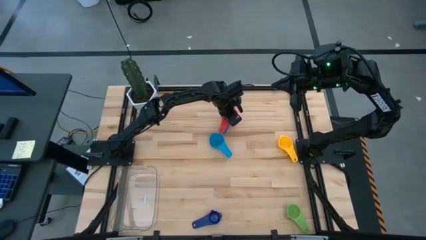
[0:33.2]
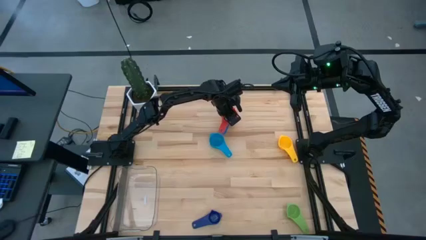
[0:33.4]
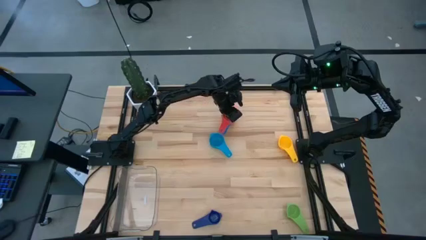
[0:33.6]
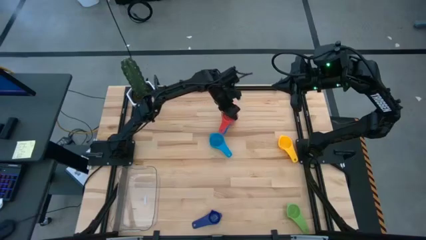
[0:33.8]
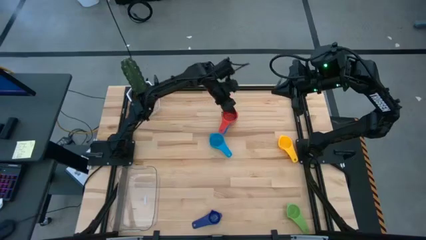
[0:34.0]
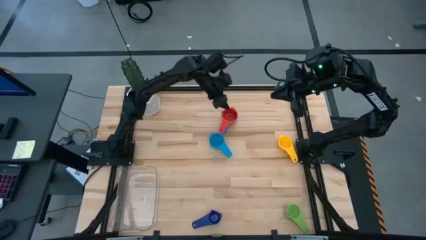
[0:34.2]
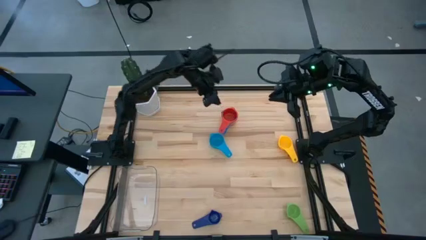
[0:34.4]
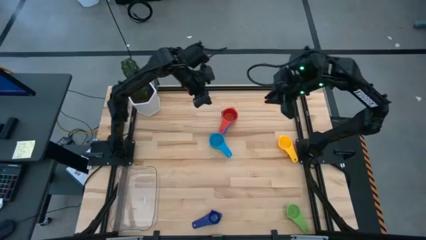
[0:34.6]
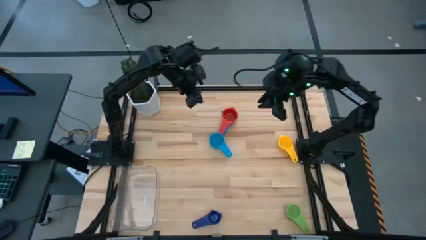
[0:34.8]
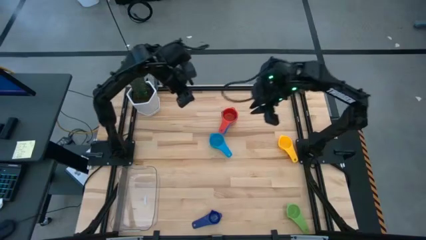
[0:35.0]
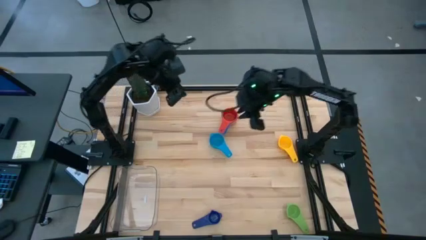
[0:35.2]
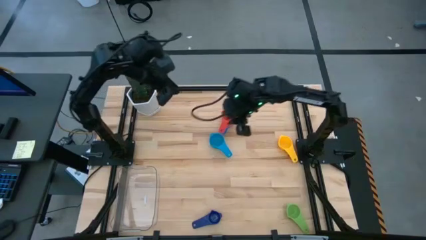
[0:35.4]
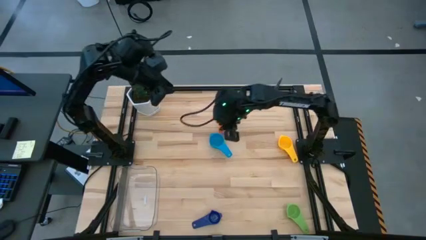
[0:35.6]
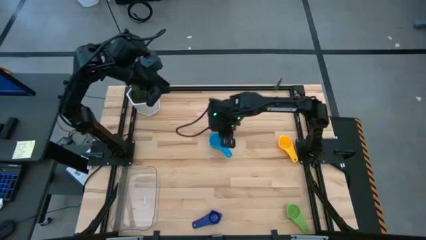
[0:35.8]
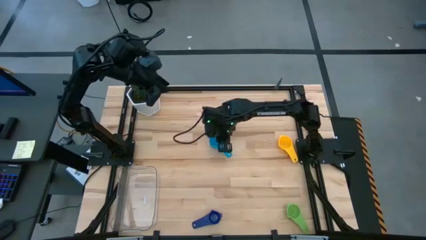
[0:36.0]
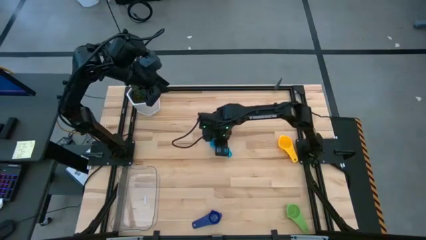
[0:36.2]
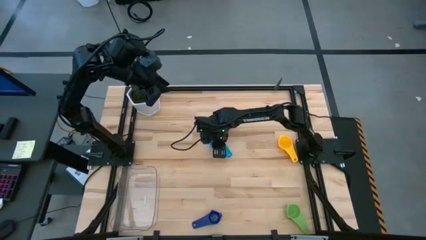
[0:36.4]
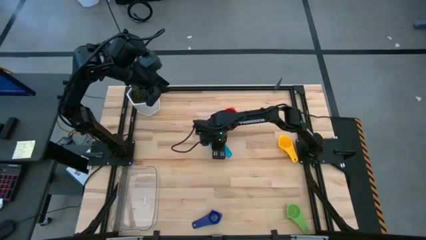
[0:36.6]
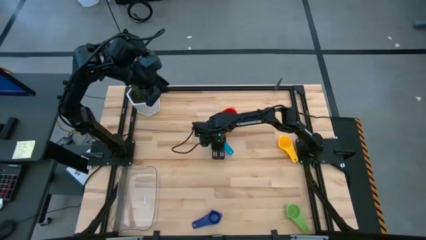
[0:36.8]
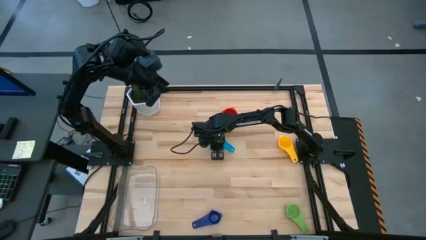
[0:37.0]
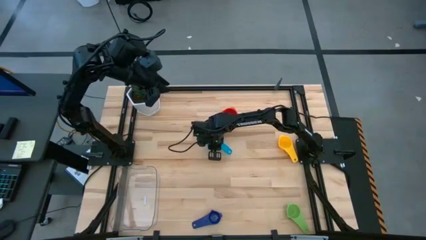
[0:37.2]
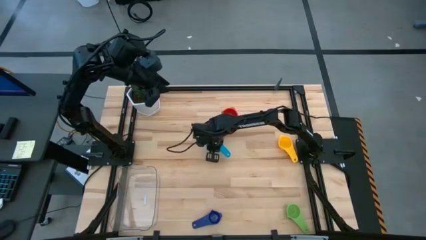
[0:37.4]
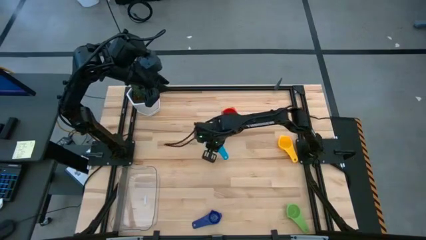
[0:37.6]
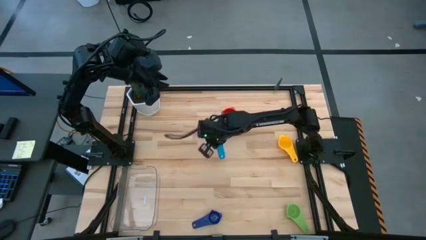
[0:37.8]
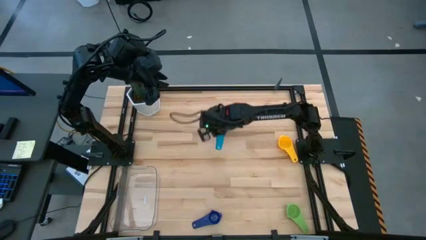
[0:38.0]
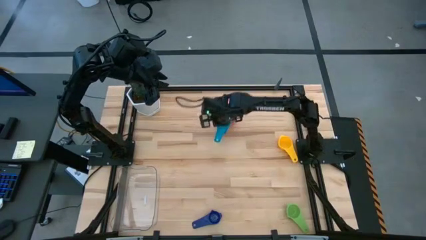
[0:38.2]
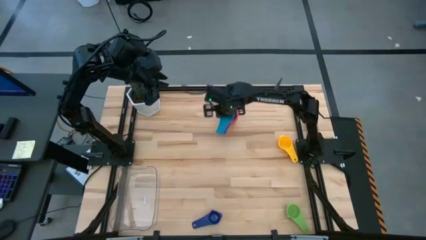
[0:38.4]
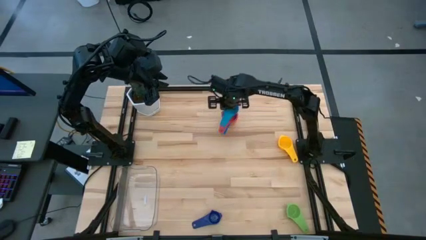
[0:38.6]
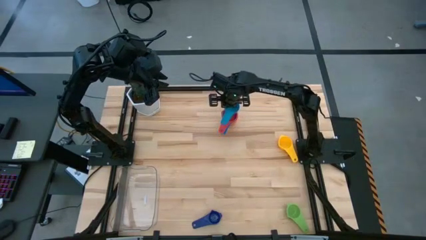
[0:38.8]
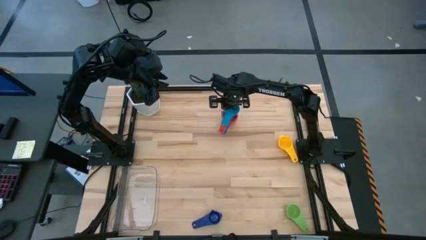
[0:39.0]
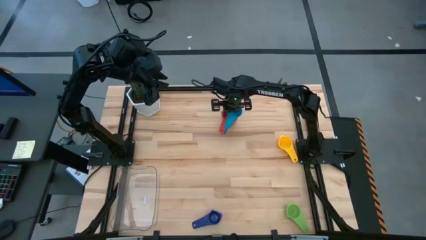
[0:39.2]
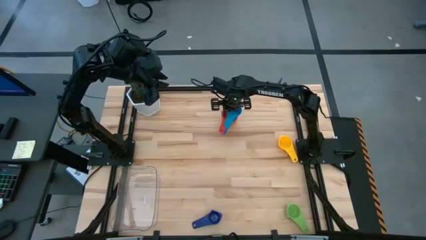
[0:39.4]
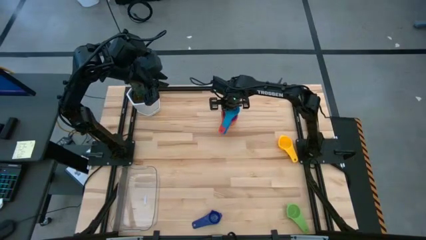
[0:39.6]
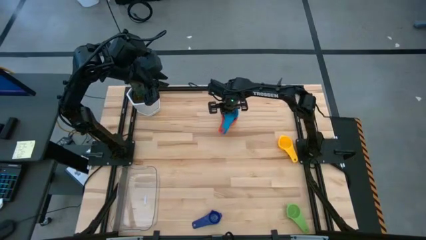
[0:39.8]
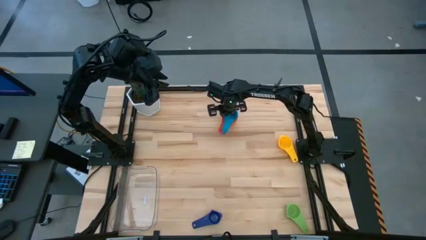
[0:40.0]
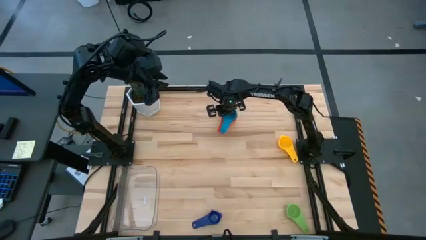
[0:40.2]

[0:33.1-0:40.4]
Task: Nest measuring cups in basket
Stack the light blue measuring cup on top of the red measuring cup

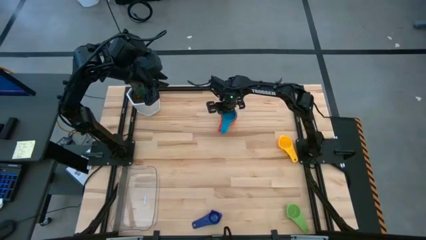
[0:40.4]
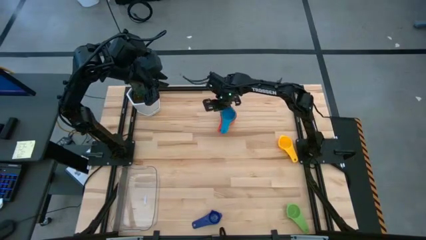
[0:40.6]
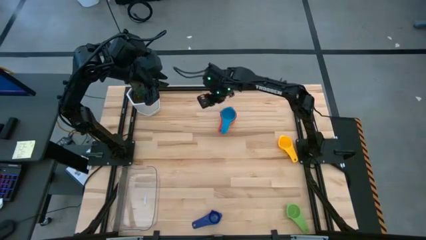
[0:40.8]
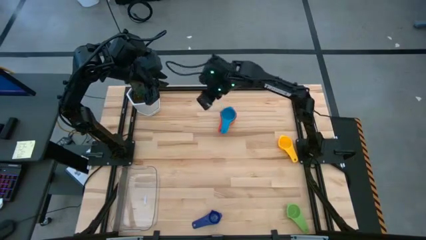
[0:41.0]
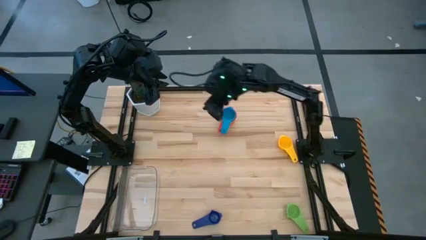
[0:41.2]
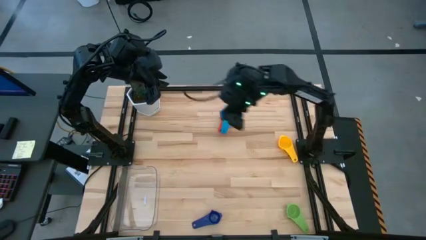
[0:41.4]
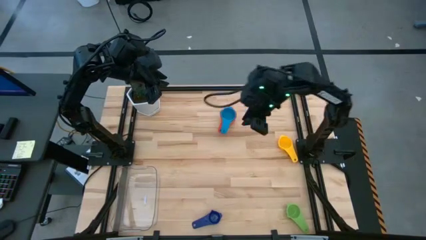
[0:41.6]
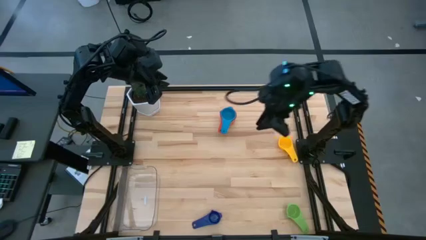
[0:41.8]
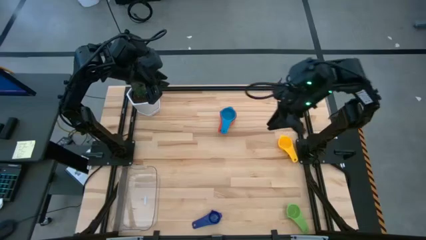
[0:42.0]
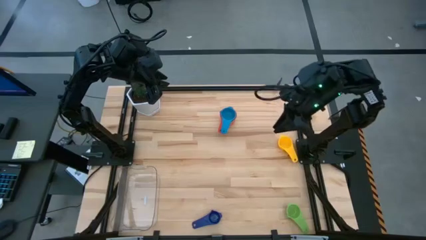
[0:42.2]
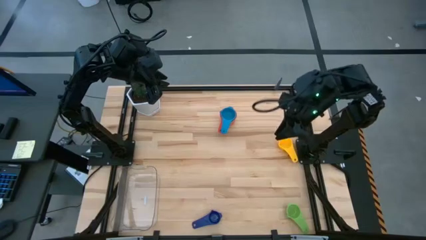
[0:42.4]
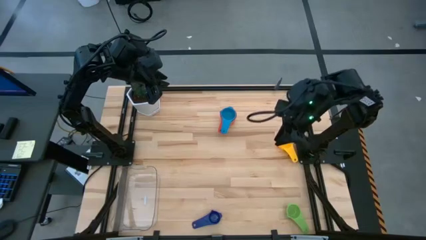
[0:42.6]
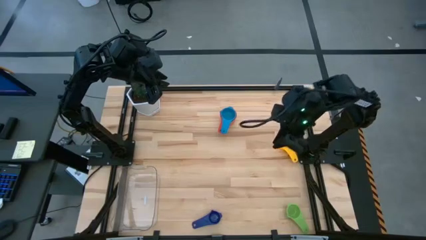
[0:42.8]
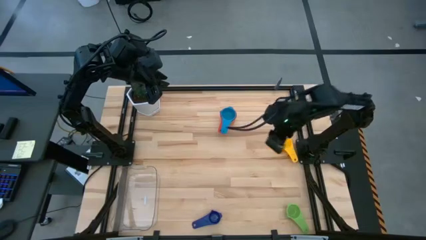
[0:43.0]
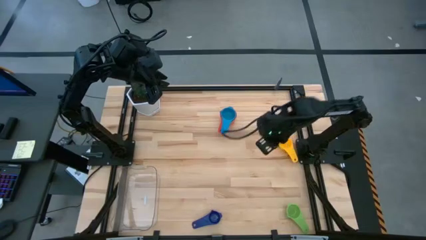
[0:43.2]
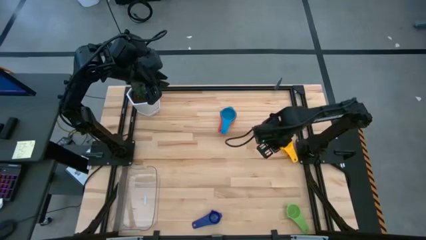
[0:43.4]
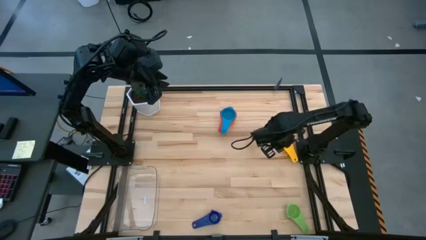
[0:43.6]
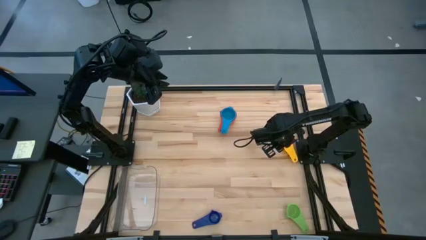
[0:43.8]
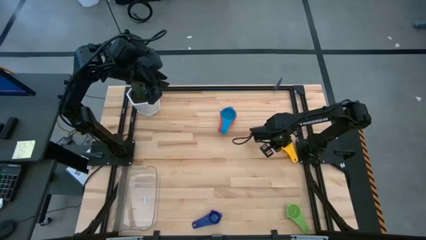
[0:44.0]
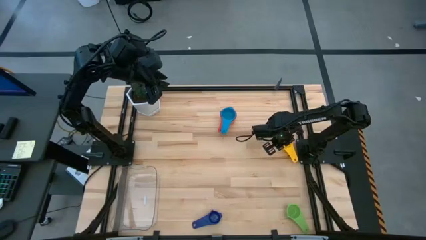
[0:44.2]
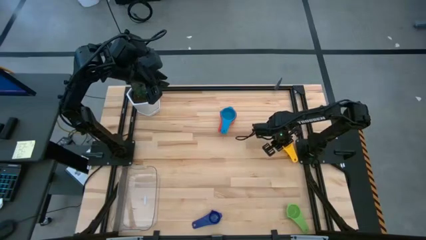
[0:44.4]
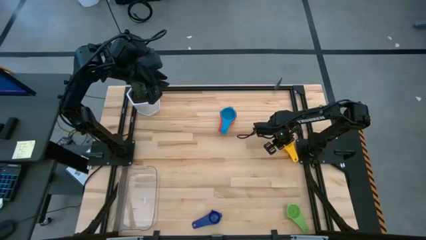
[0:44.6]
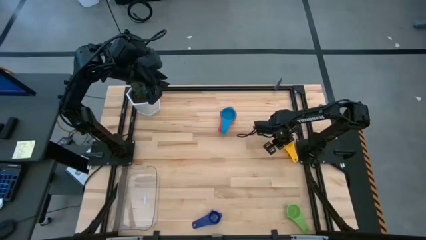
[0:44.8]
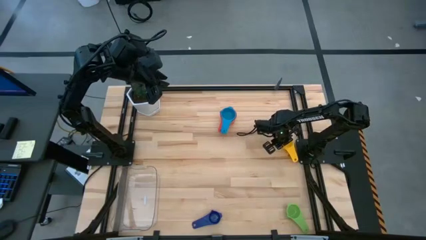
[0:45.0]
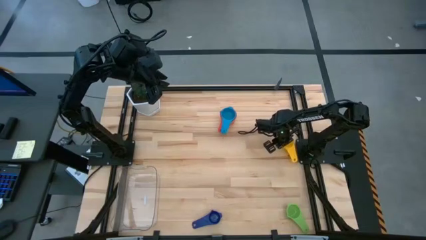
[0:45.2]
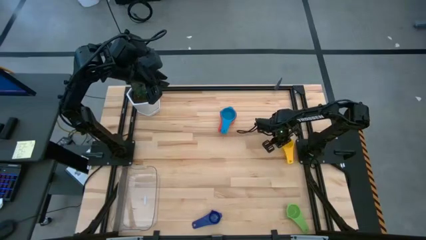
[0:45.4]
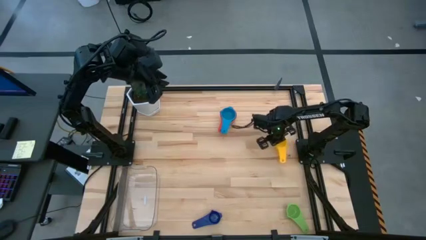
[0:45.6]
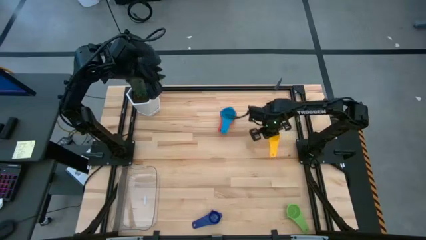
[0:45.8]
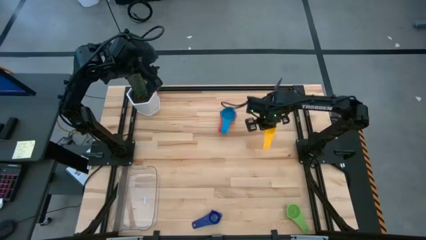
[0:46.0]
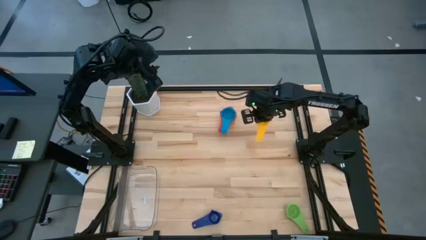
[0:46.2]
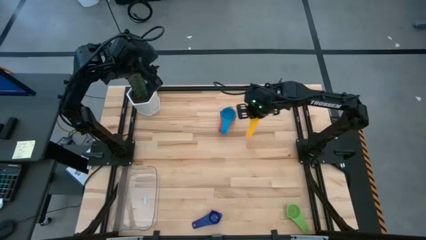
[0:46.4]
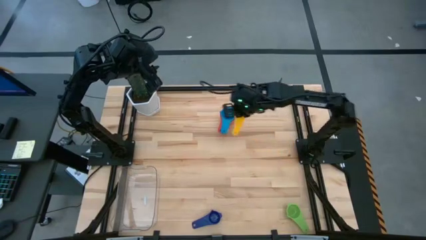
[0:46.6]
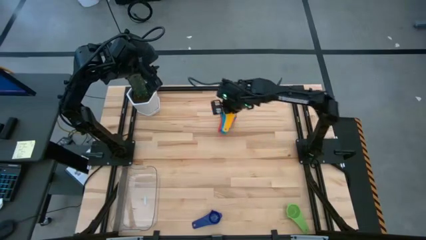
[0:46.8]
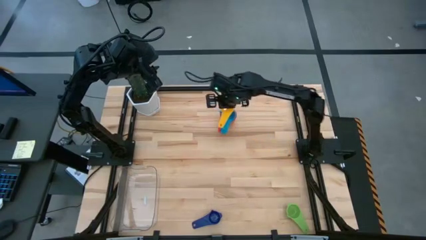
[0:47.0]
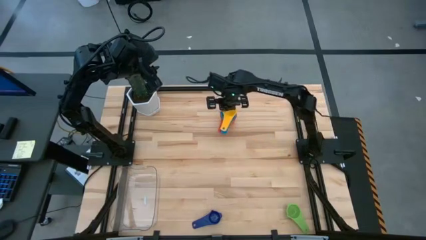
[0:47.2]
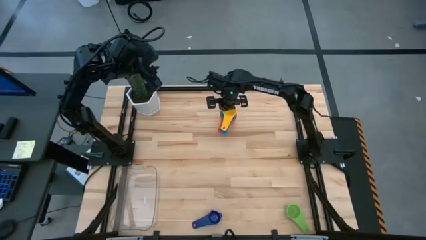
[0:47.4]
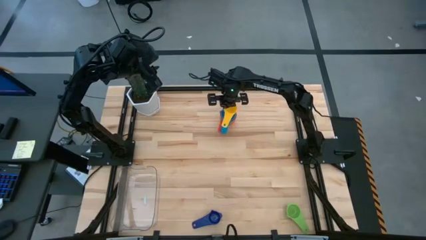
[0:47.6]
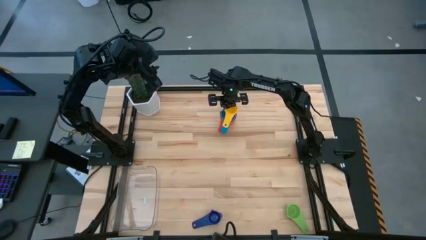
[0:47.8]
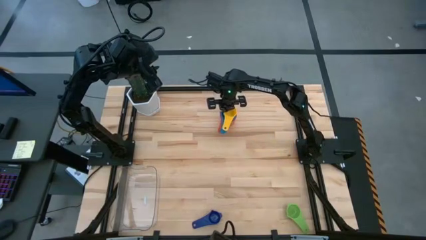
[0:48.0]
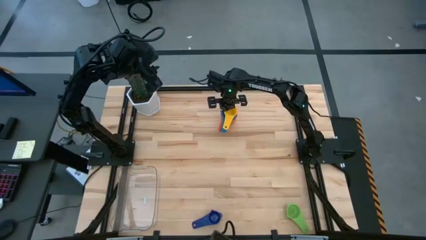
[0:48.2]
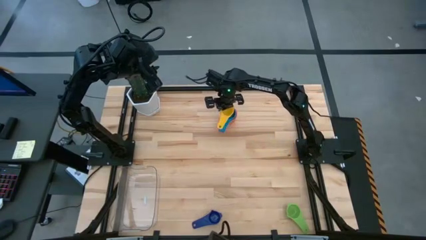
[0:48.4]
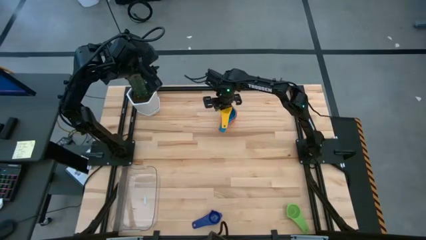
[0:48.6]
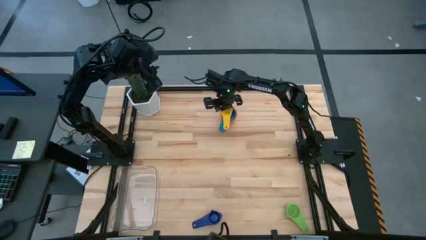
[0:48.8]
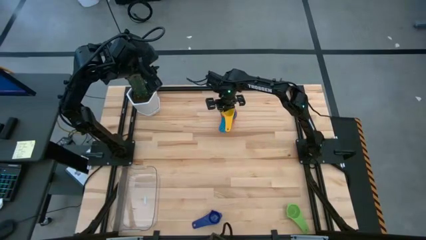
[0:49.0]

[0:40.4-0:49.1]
Stack the yellow measuring cup on top of the light blue measuring cup
